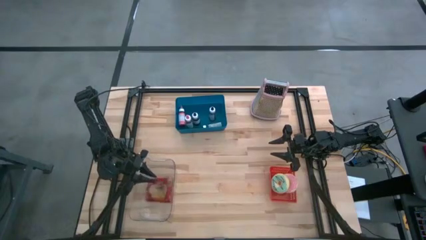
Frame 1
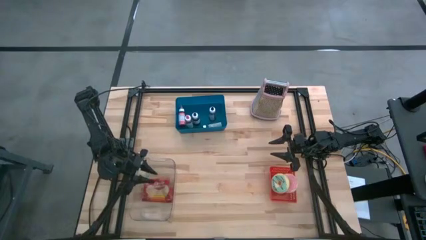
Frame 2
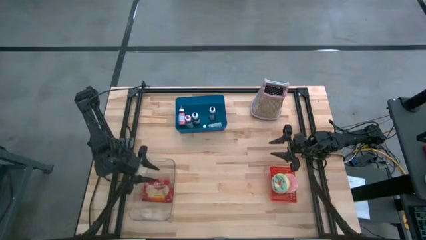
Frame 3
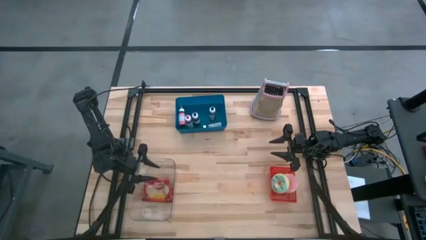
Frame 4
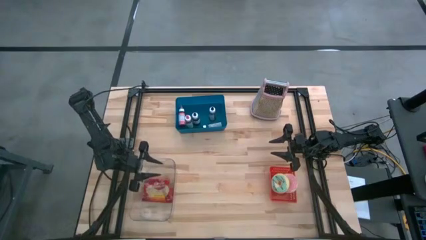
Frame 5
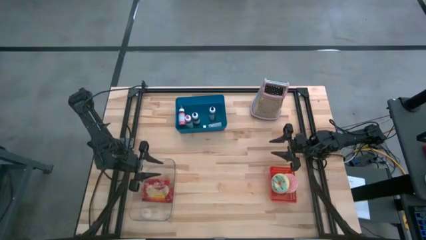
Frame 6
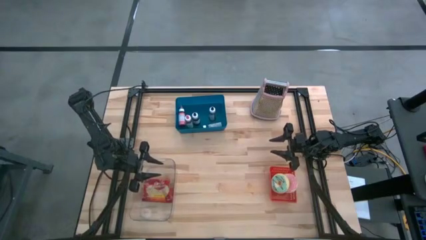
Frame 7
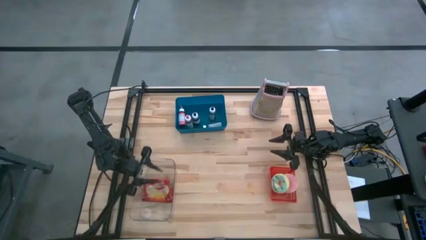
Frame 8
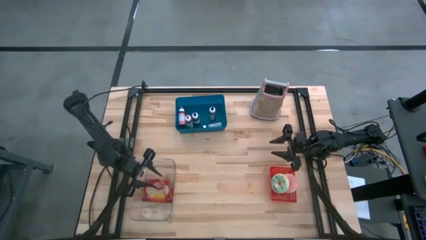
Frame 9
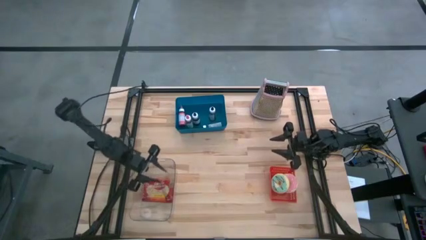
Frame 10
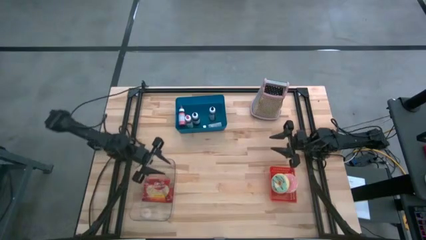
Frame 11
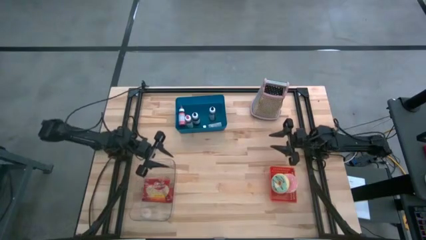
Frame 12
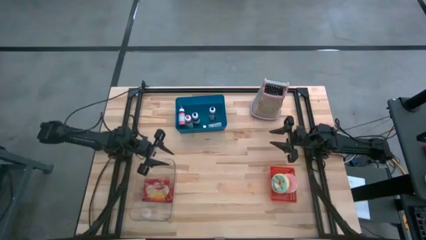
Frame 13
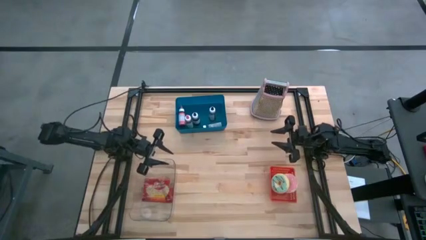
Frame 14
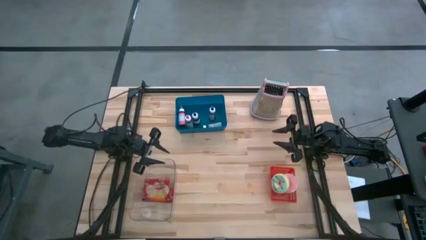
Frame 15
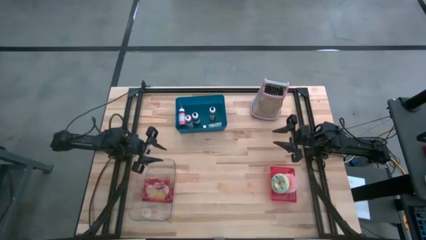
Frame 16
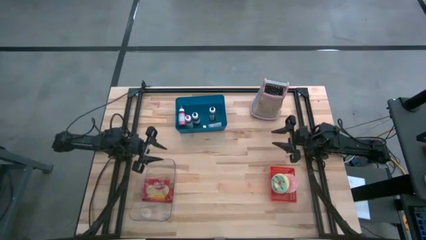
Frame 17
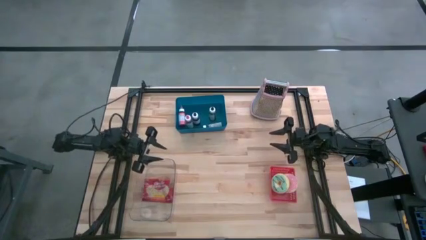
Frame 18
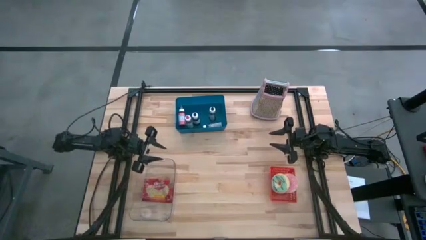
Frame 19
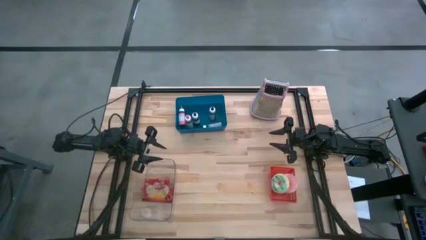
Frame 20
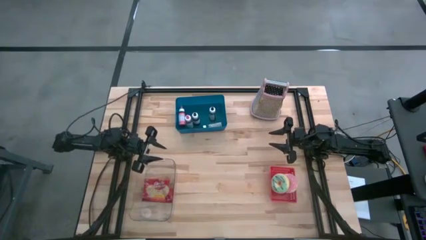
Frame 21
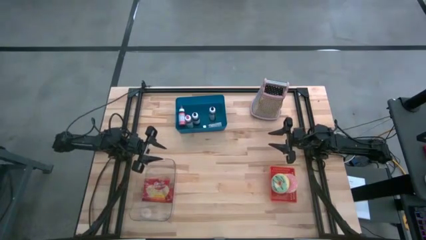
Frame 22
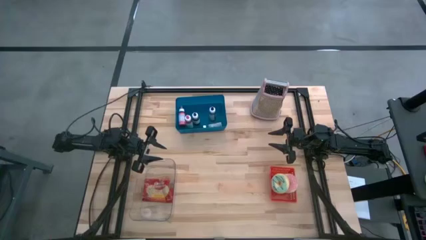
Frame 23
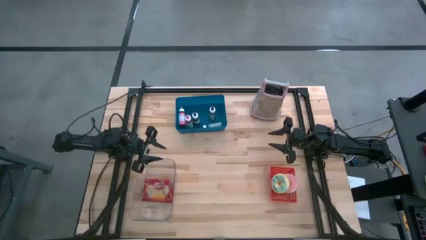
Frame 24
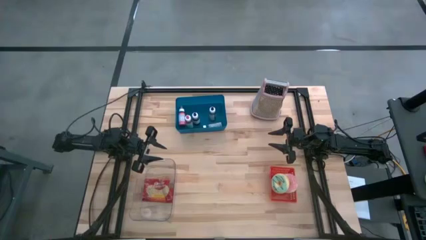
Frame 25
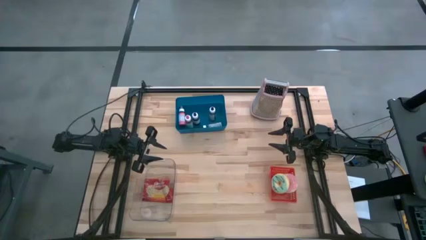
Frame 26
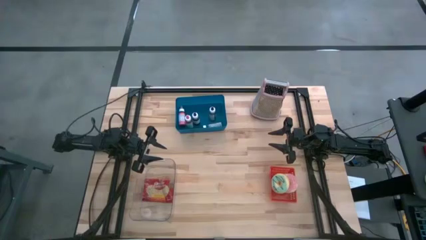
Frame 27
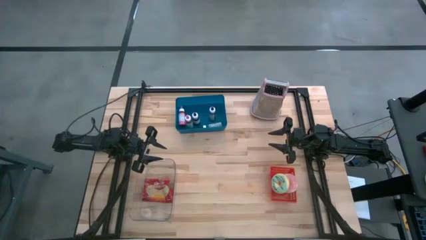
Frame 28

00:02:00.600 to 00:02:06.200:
Task: Pick & Place Food Item
Return to Home Position

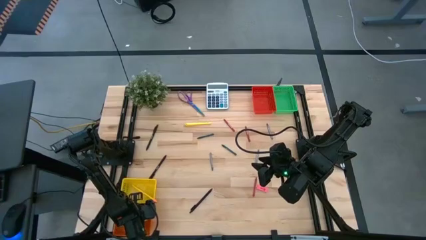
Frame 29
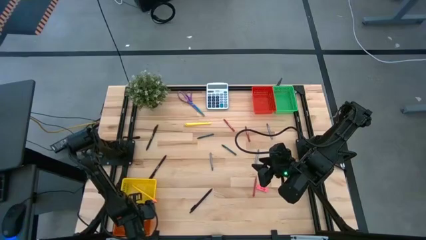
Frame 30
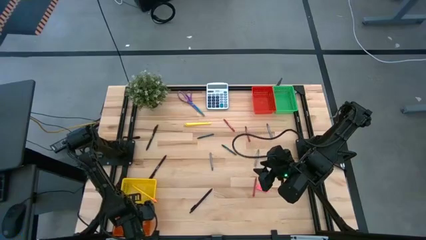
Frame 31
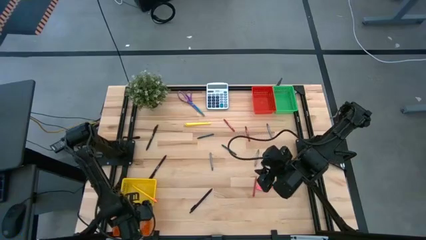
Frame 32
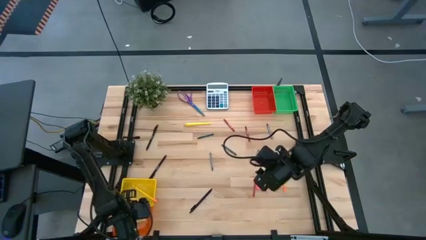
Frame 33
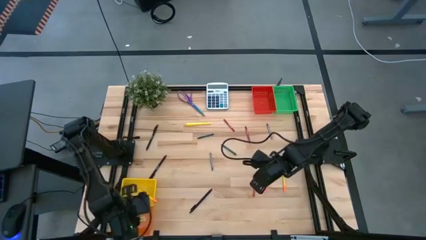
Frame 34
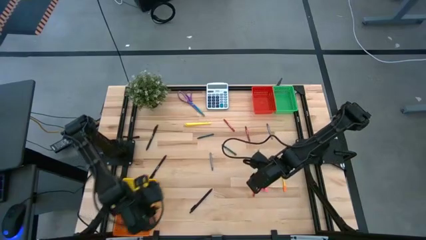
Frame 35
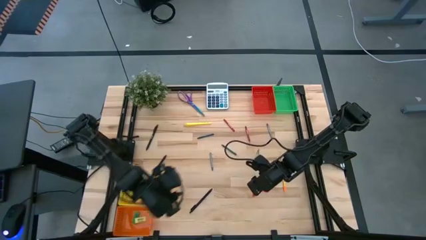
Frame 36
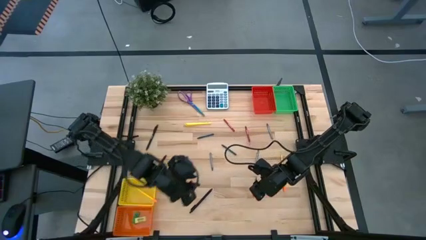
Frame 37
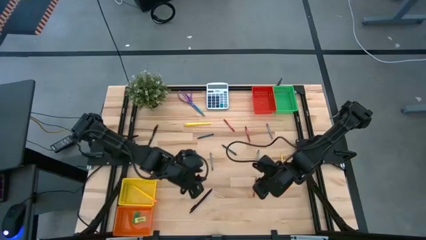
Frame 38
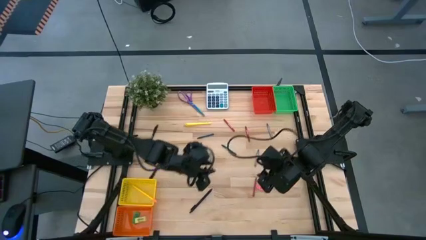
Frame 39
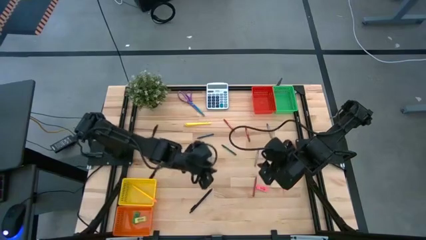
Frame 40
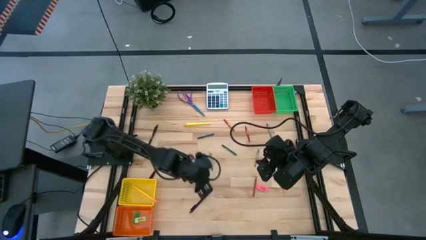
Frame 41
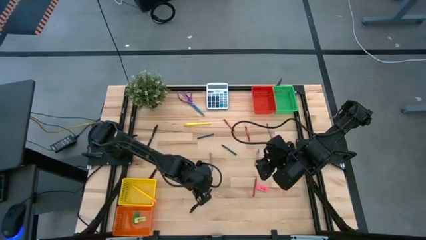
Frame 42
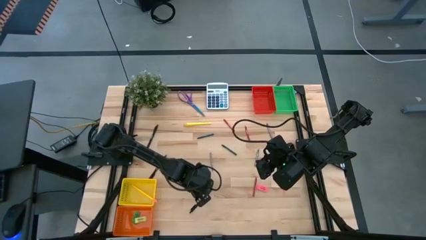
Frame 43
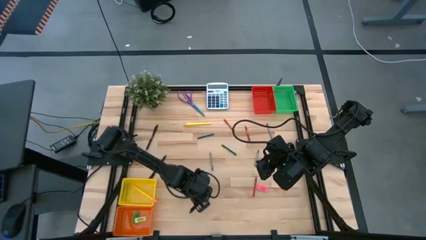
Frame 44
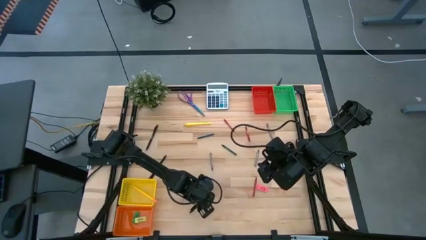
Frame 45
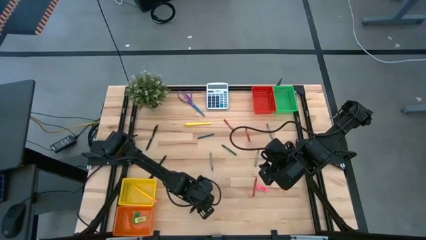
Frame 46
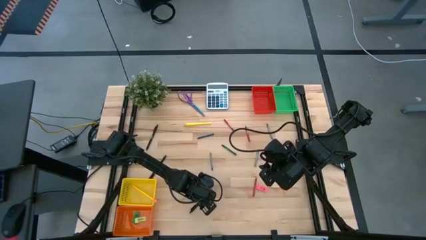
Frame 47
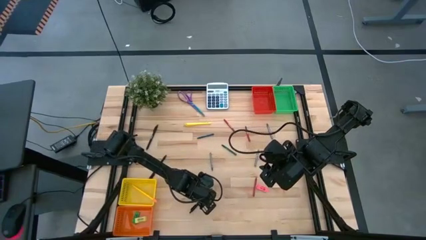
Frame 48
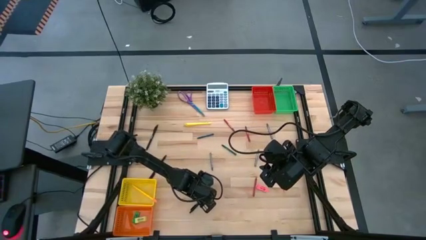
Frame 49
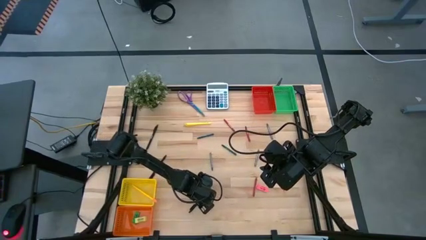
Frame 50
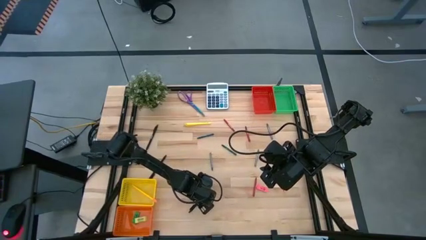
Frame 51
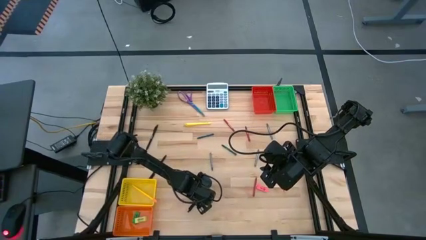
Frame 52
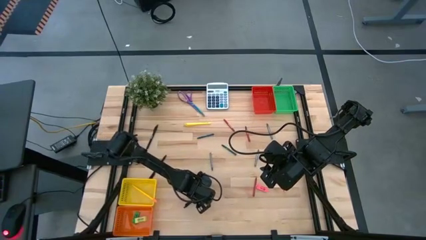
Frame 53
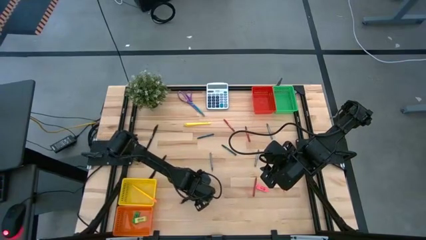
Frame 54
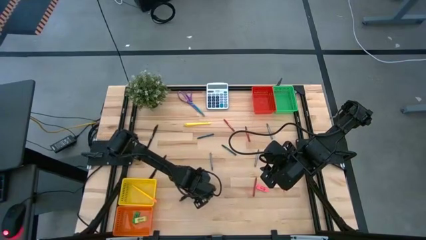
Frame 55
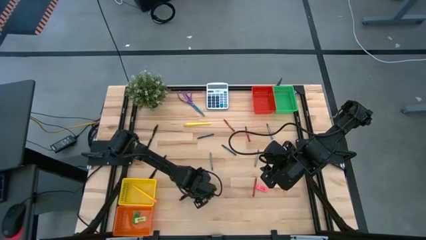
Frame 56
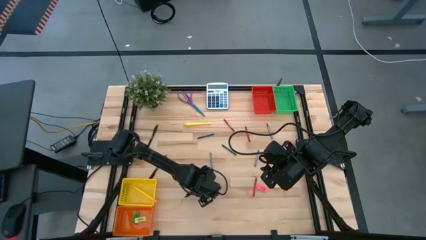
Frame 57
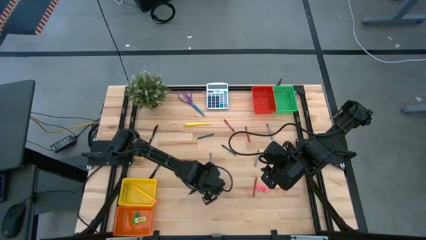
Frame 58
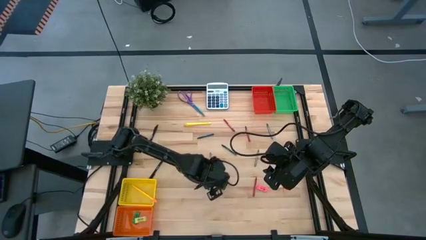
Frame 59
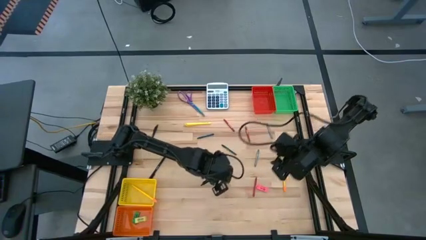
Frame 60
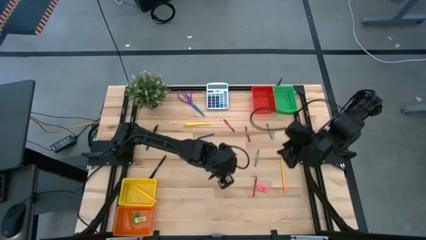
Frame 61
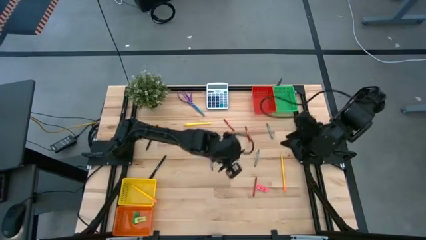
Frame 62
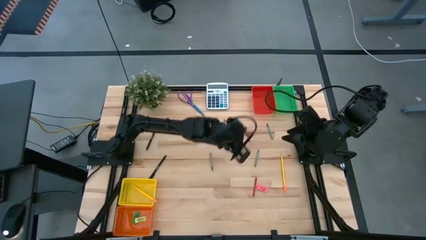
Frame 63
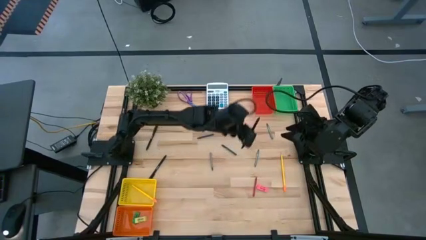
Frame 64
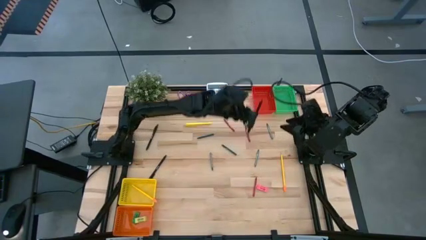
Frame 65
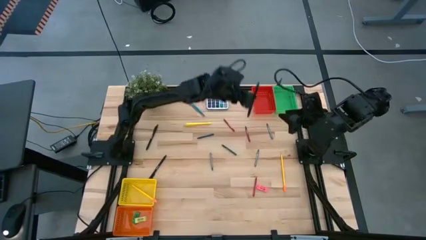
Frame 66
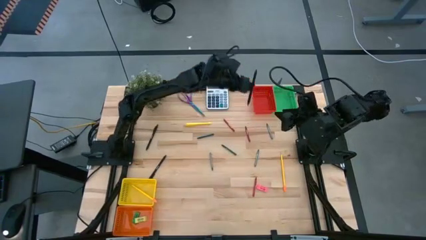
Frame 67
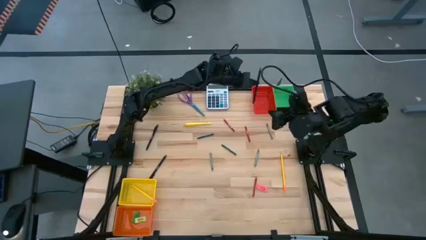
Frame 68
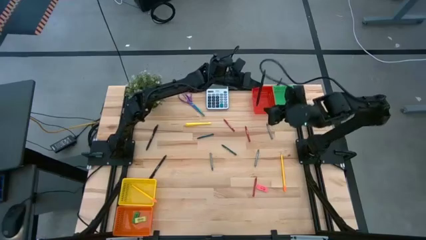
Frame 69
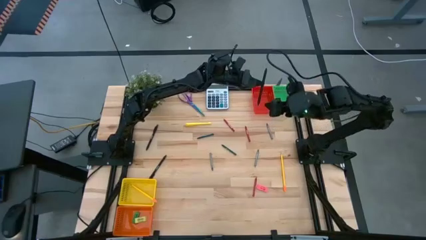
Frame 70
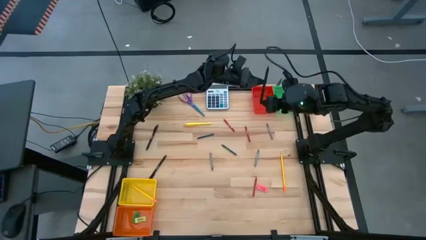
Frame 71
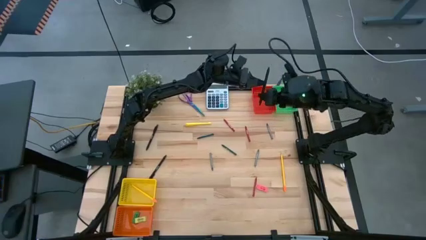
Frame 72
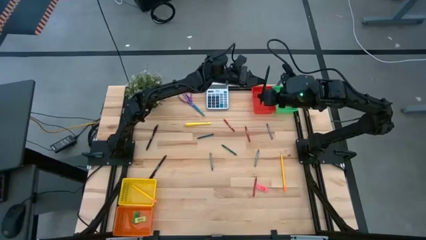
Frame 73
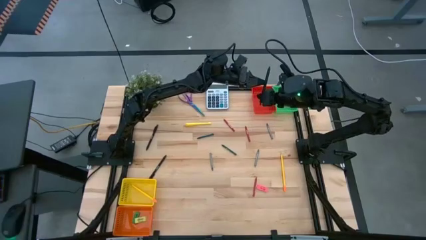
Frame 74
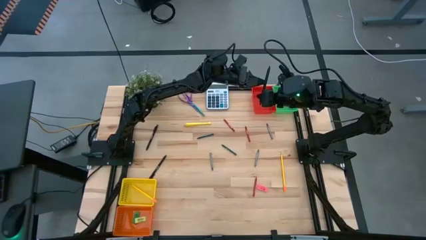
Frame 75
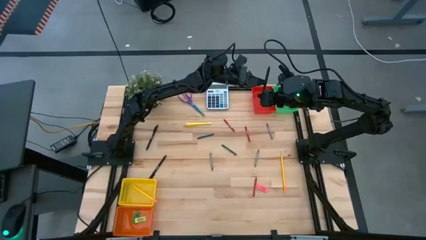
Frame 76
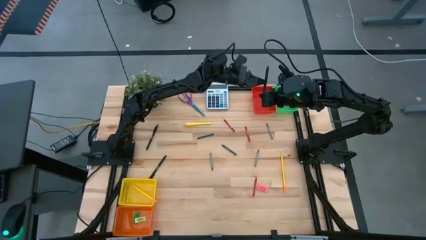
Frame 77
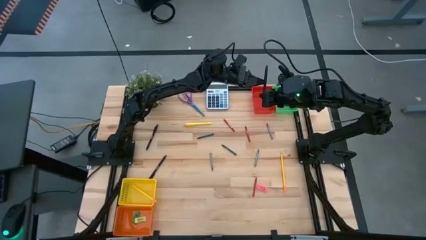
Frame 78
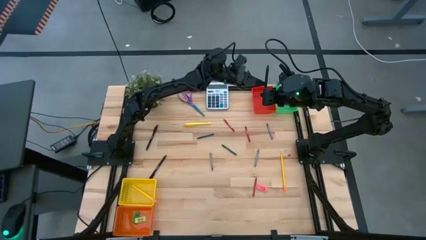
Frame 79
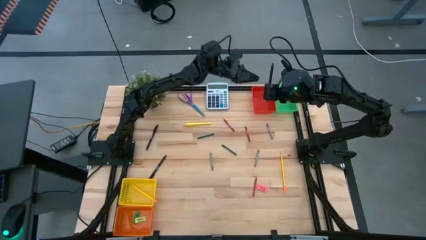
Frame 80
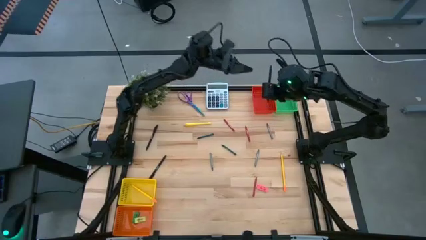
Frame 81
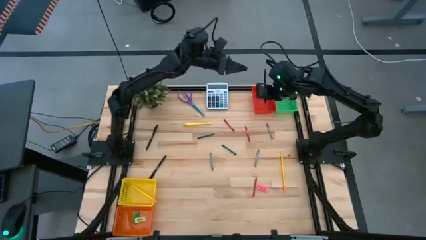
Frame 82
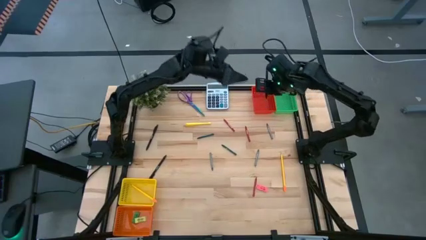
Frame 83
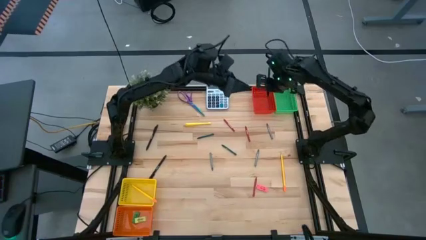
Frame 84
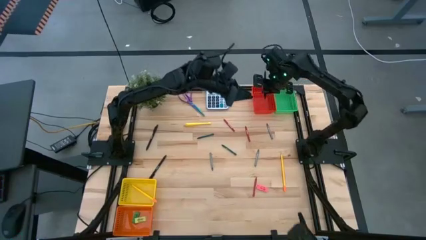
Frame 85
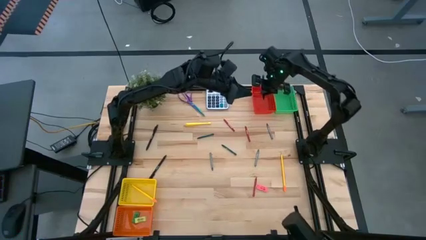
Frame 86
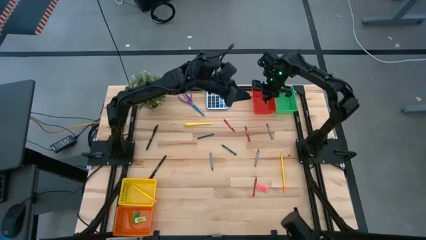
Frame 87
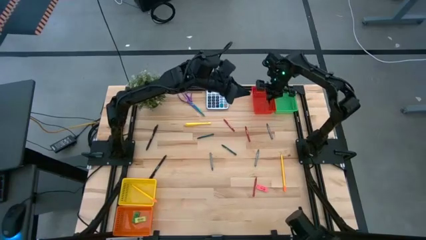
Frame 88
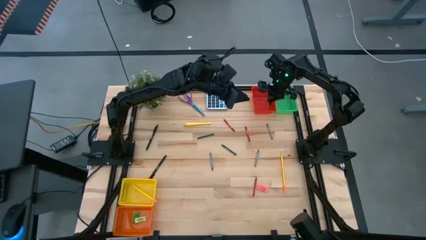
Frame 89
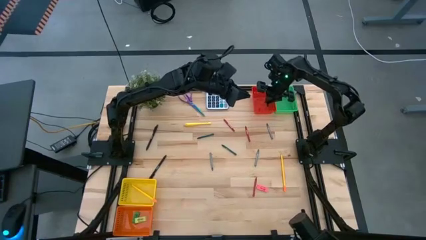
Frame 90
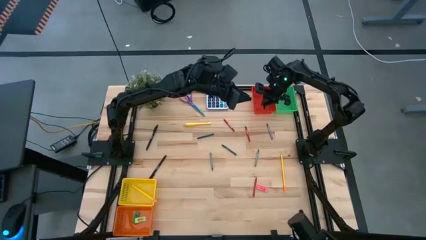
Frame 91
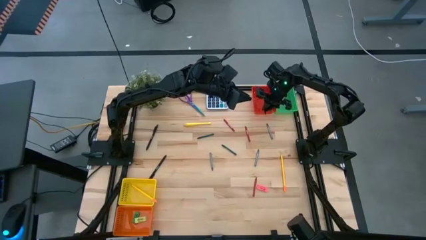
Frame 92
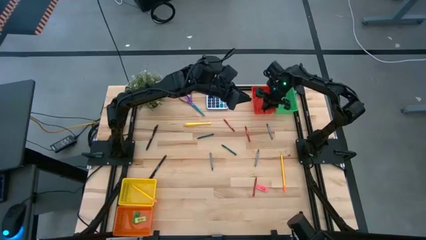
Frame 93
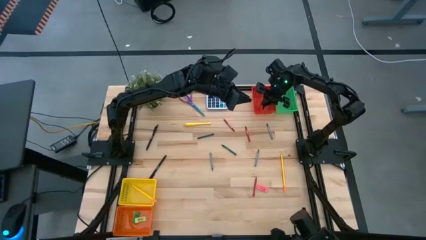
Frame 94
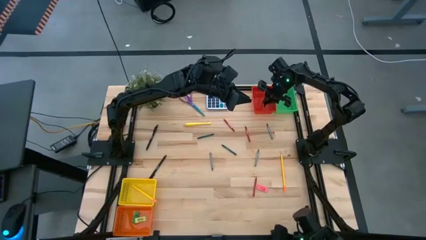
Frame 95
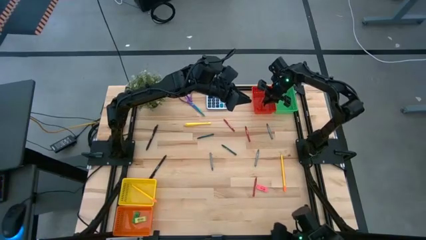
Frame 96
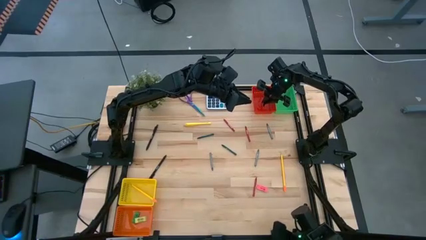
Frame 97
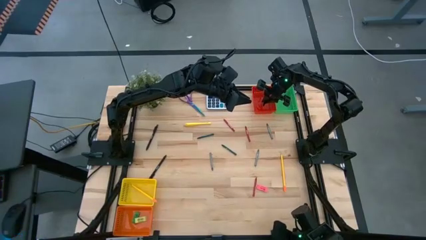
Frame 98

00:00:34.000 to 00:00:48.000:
Task: Sort crayons/erasers/pens/pencils in bins
Put the bottom black pen into the red bin
